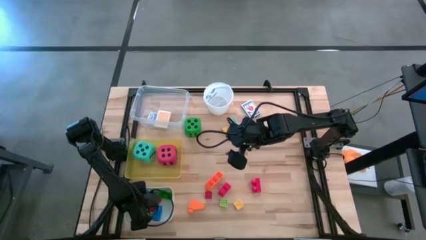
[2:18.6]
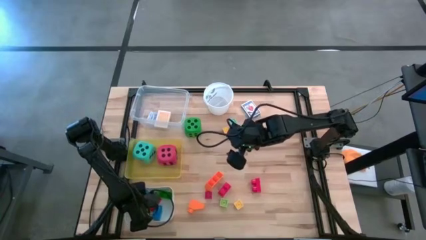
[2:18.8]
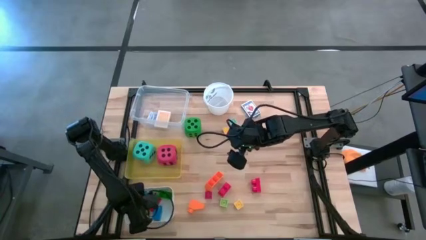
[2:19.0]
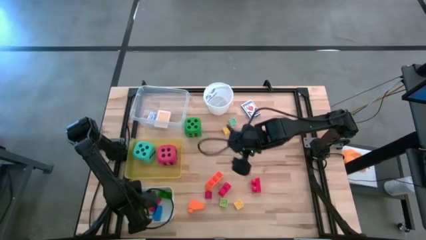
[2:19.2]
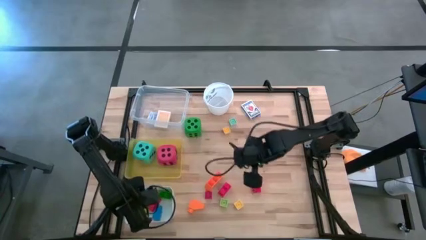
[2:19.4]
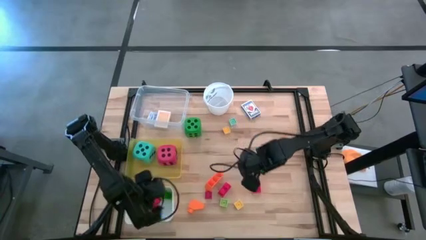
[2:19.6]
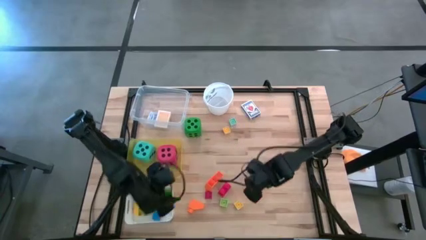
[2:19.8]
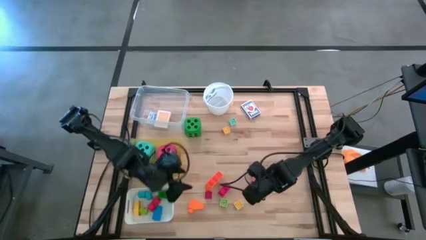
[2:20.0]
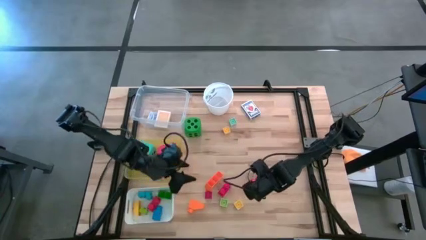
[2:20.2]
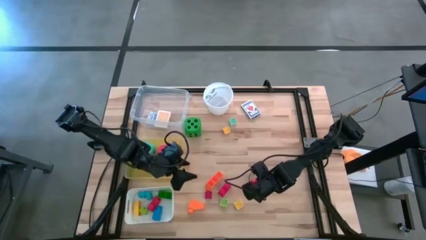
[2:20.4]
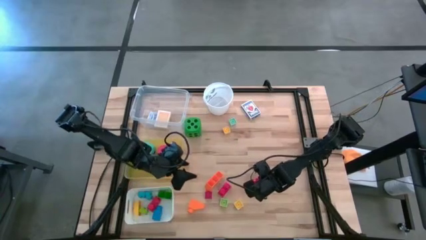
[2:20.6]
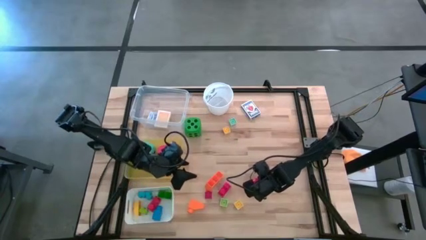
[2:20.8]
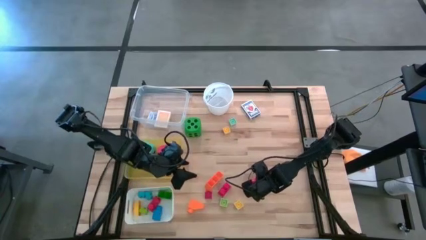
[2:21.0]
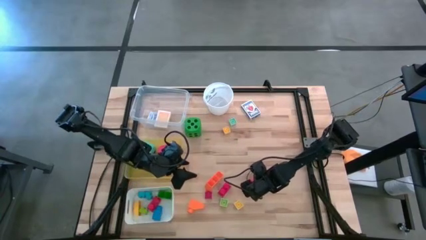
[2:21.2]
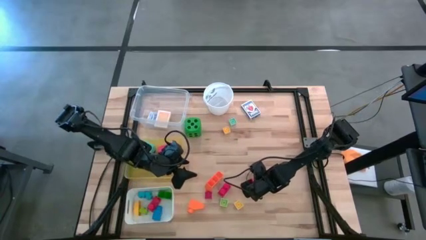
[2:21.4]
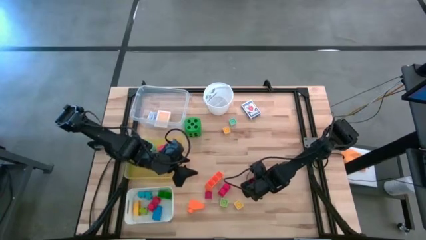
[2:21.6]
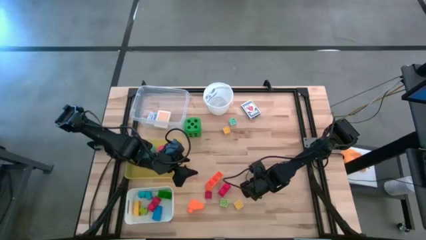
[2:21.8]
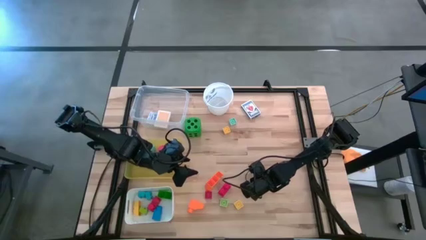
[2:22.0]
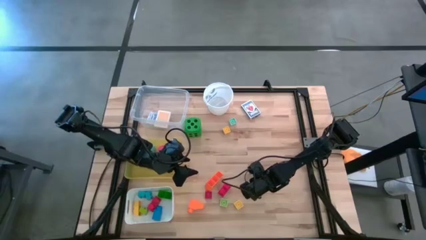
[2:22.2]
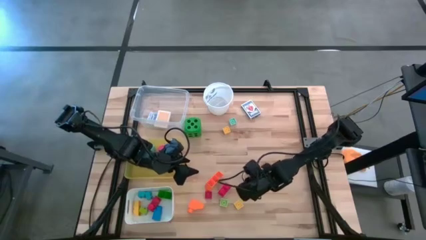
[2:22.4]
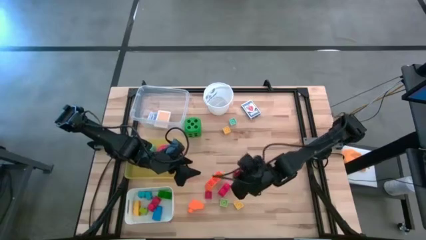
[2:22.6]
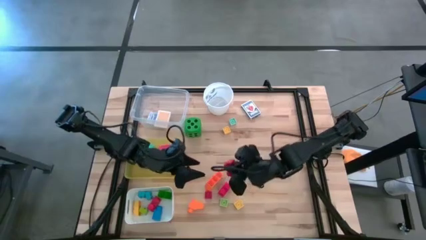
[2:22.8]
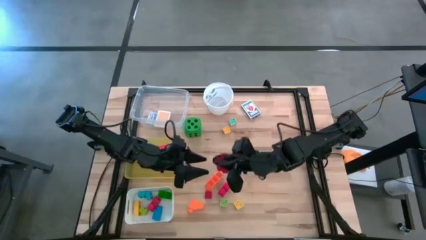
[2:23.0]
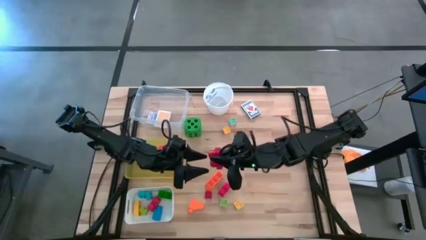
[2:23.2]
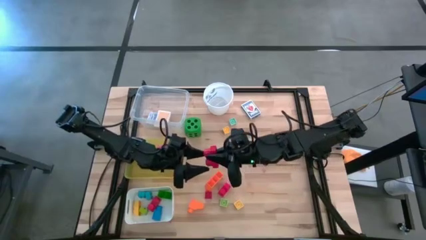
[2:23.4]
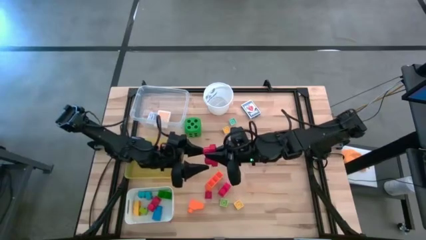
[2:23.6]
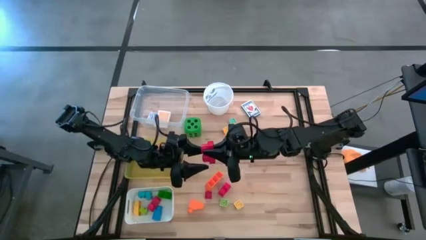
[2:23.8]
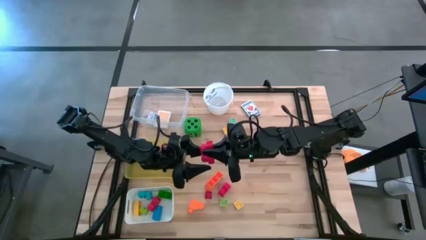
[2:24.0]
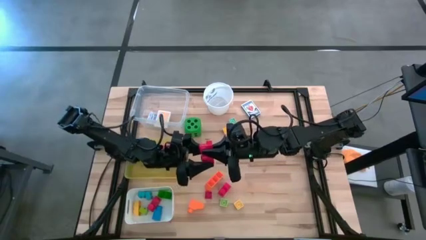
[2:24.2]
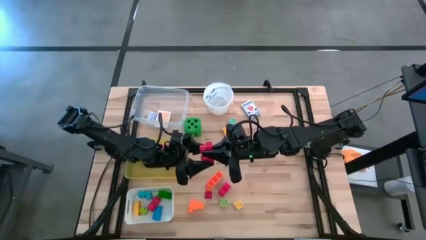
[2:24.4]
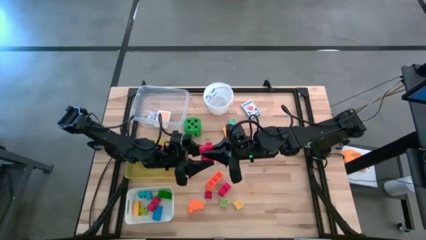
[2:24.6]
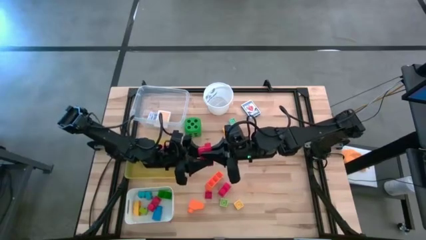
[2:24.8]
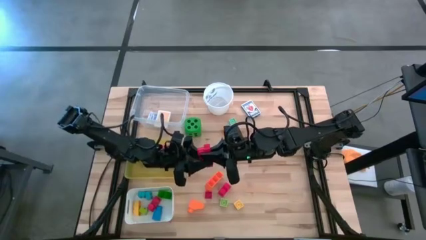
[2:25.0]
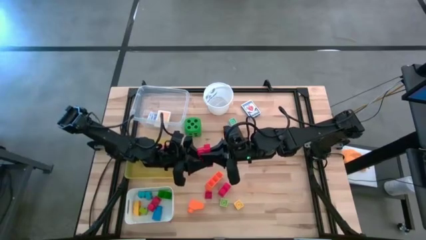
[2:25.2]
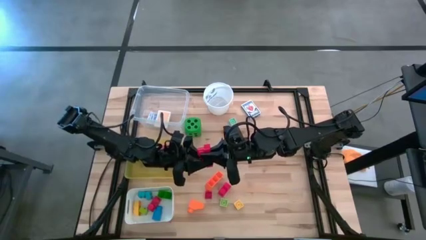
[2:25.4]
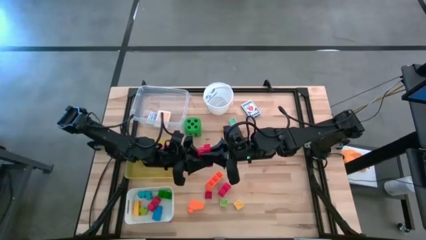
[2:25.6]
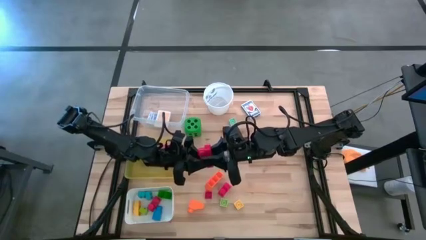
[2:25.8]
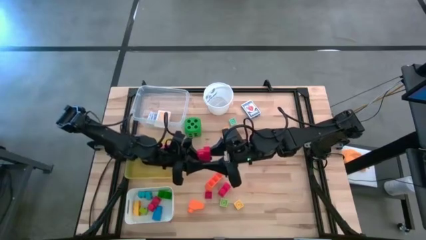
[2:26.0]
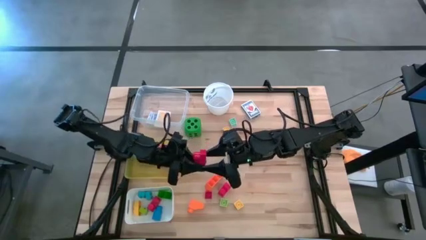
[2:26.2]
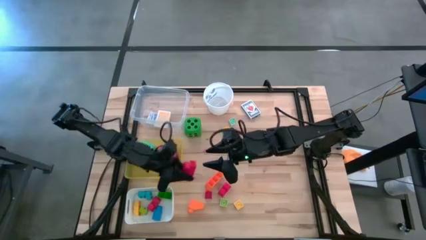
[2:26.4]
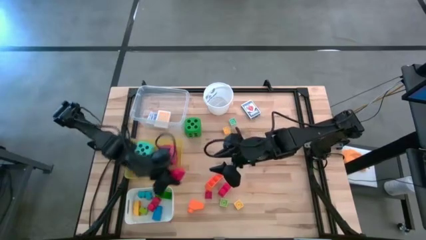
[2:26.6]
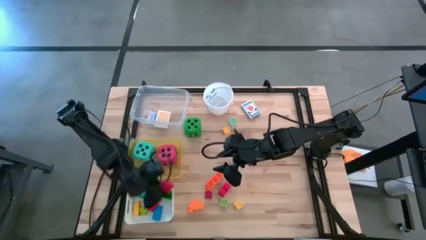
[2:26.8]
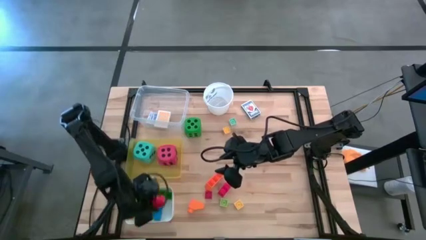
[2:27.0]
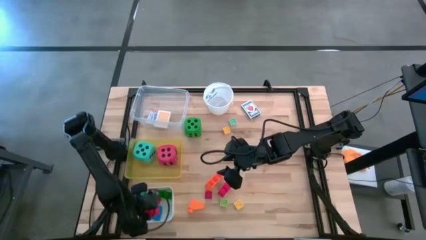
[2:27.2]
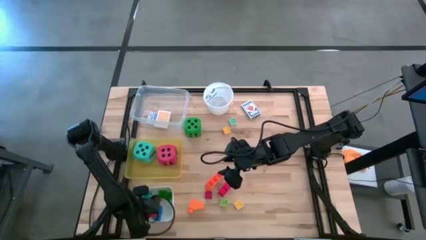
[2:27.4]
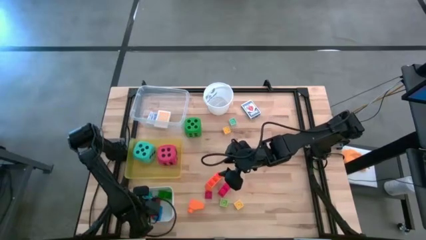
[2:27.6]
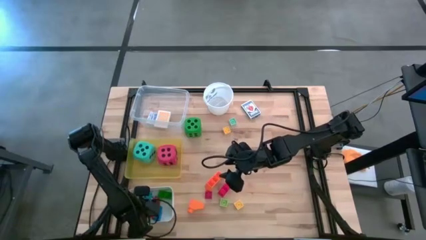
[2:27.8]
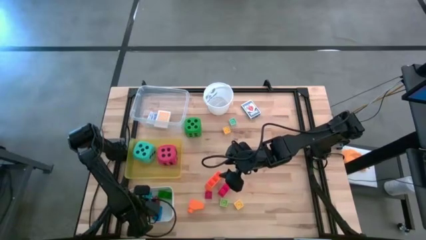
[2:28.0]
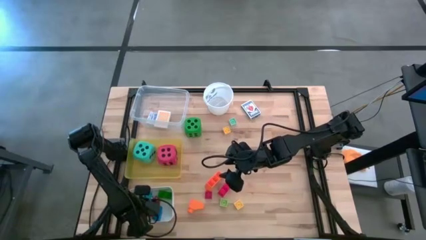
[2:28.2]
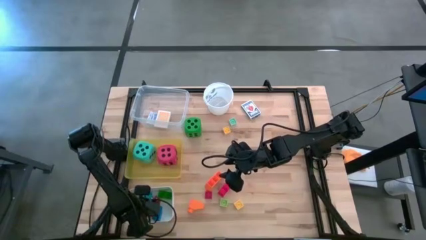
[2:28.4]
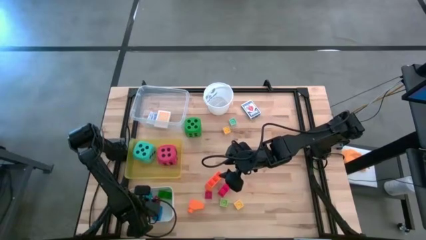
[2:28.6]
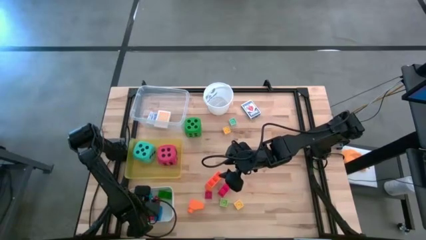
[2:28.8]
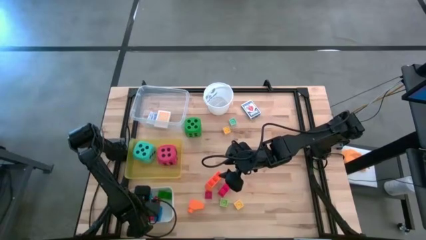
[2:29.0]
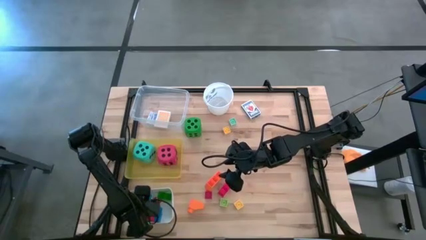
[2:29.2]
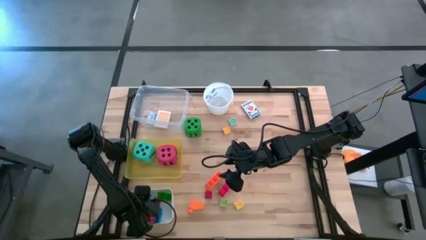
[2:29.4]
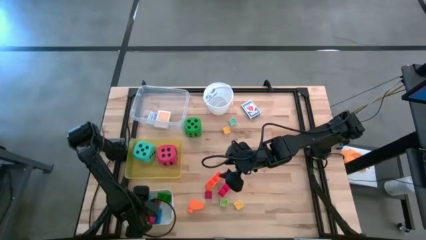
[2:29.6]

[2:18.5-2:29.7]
Task: Pick & Place Toys
Put the right red game piece into the white bin

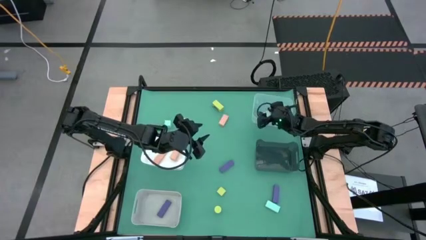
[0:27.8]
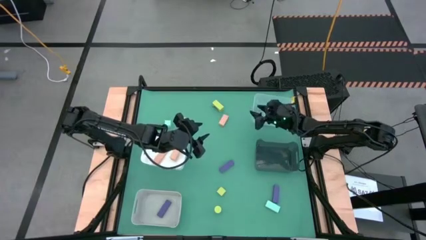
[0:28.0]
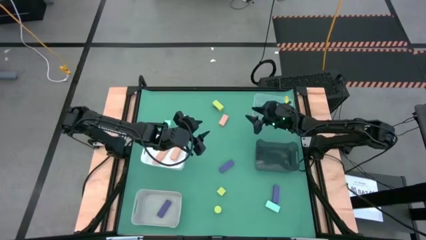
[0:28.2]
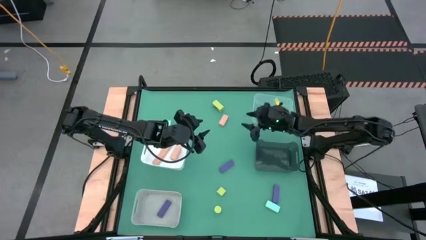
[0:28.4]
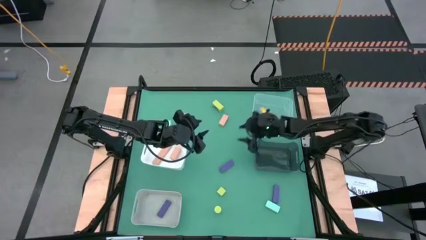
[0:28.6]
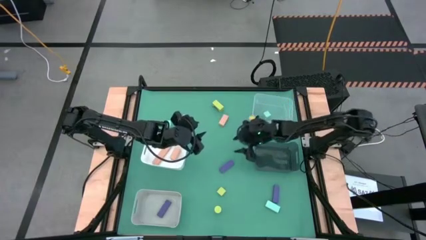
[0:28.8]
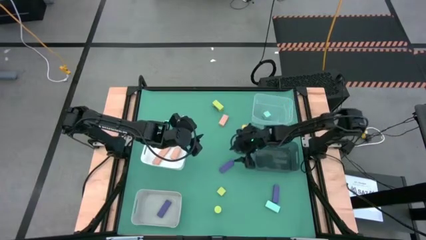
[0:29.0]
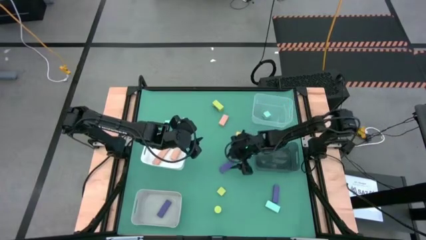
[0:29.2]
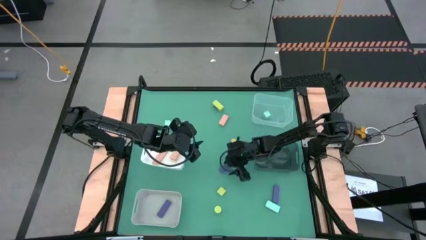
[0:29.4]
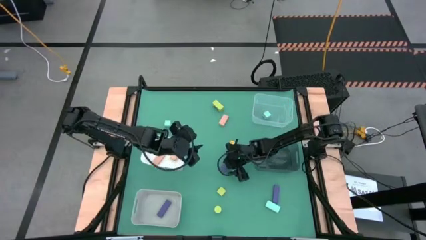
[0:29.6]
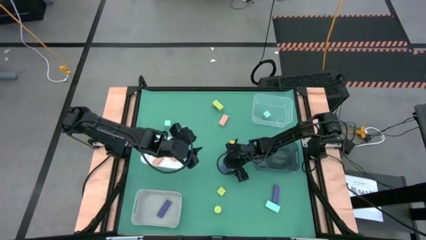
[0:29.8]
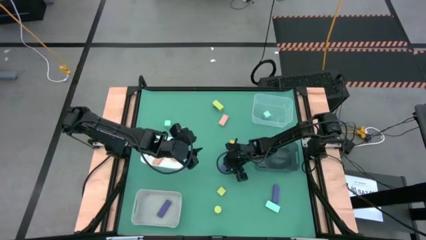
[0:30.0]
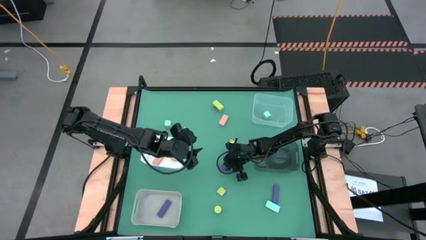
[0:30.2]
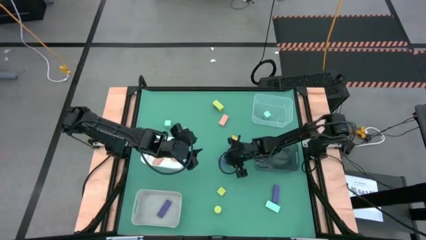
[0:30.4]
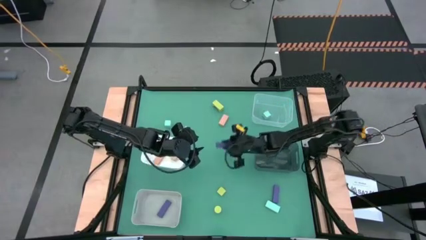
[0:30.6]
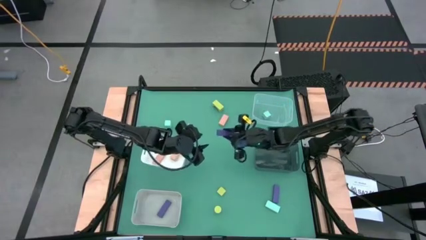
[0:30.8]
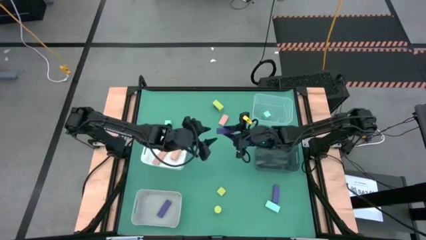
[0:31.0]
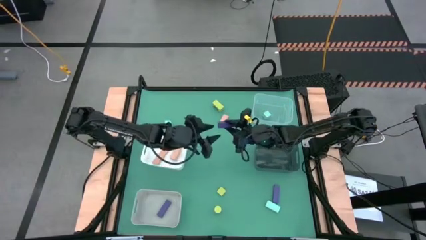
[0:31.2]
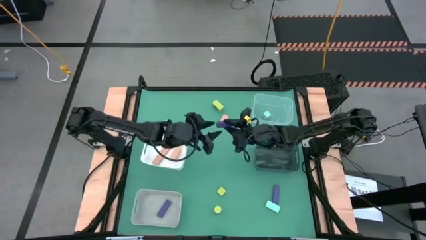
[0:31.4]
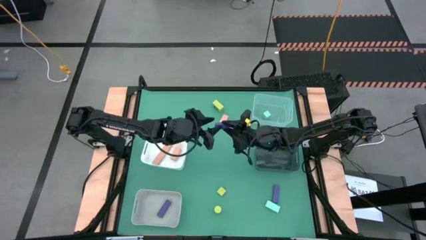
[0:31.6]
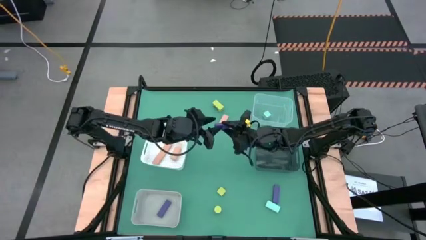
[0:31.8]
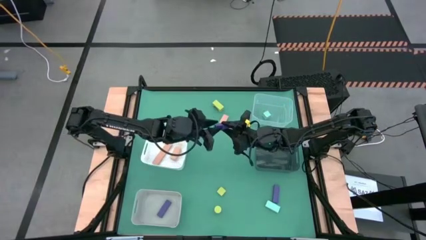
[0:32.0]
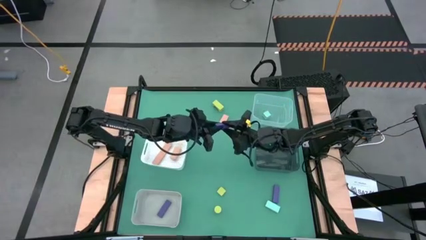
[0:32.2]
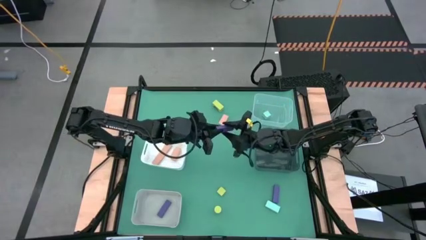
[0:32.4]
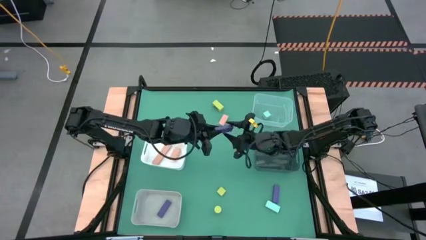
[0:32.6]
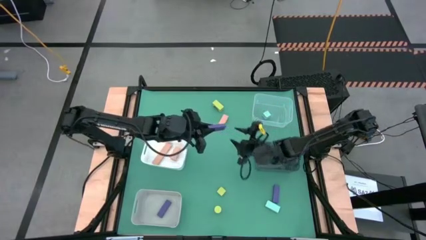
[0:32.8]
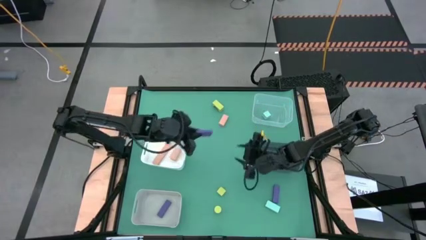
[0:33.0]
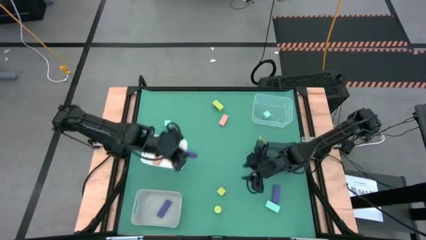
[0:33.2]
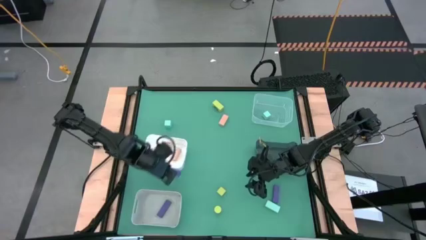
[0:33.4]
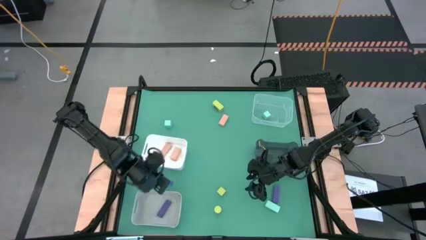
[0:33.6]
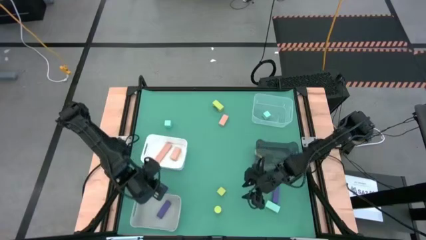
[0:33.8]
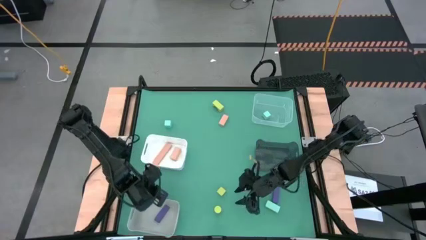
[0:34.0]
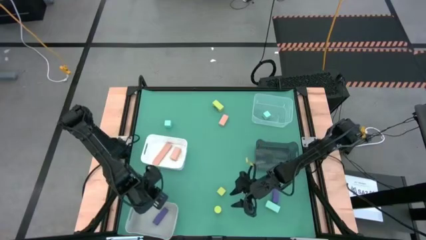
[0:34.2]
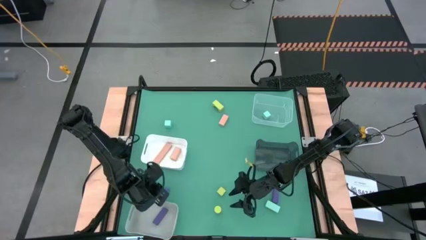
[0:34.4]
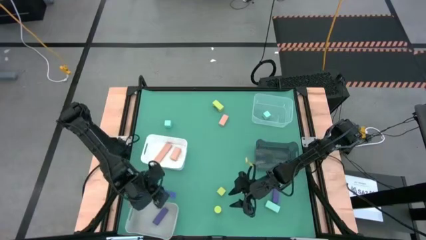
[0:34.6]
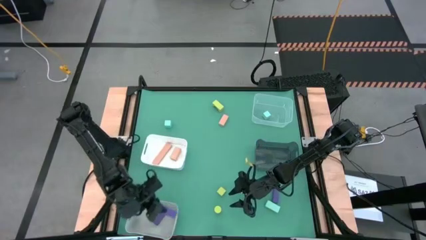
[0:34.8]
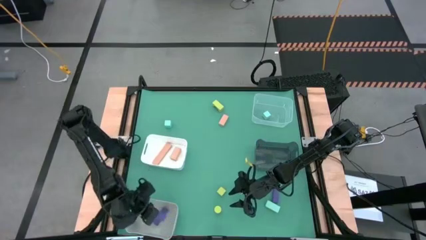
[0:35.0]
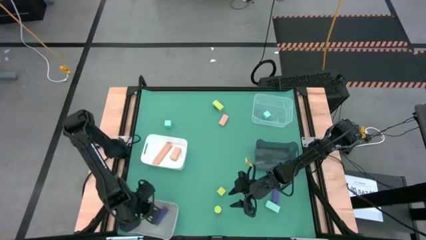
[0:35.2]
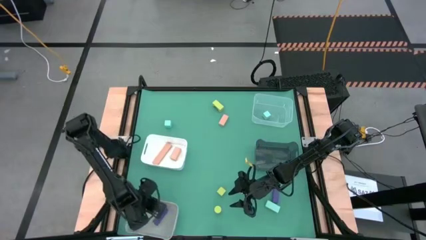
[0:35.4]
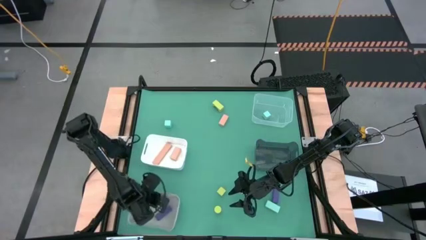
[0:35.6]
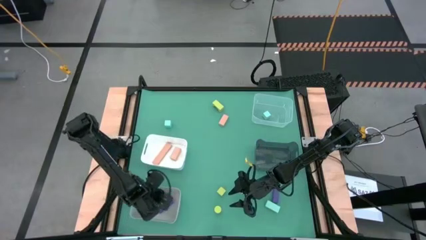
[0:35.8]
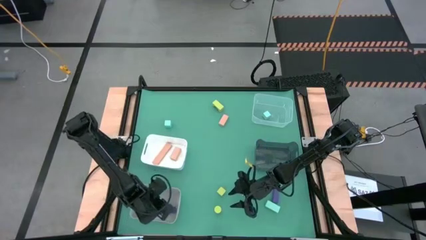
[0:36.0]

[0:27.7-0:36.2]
Task: Sort & place blocks by color
Put the top violet block into the gray bin
